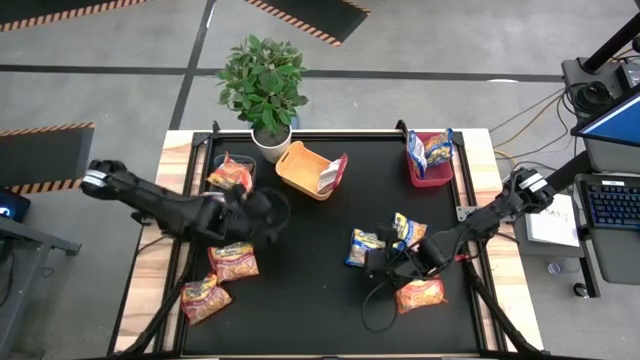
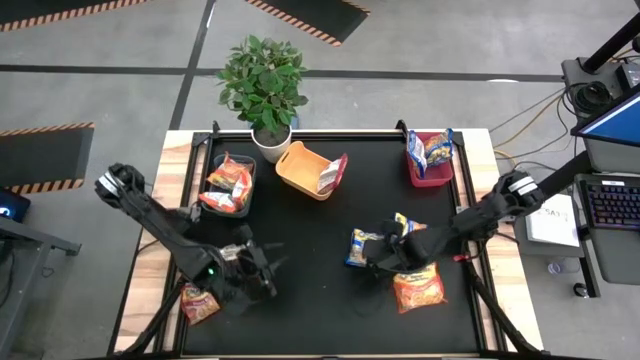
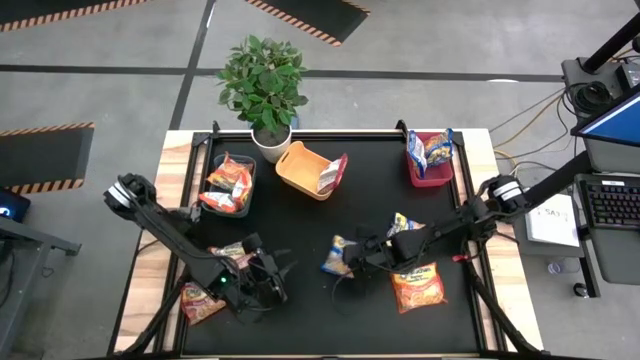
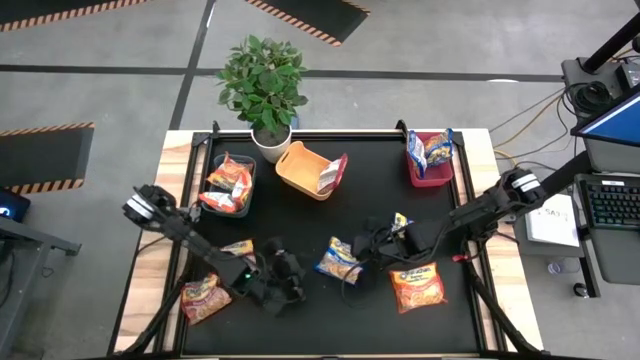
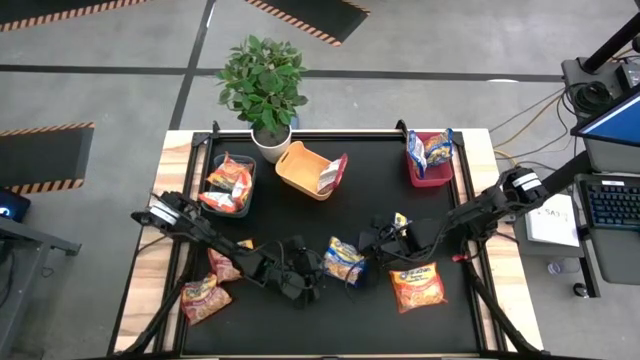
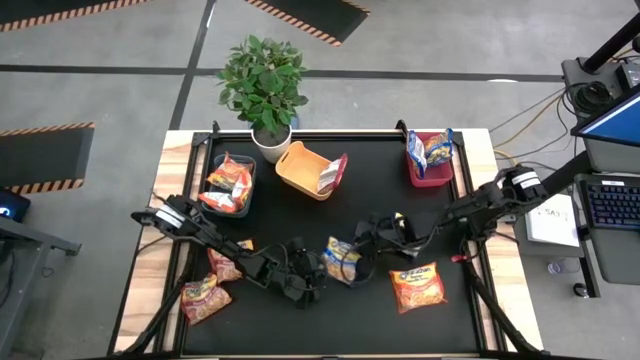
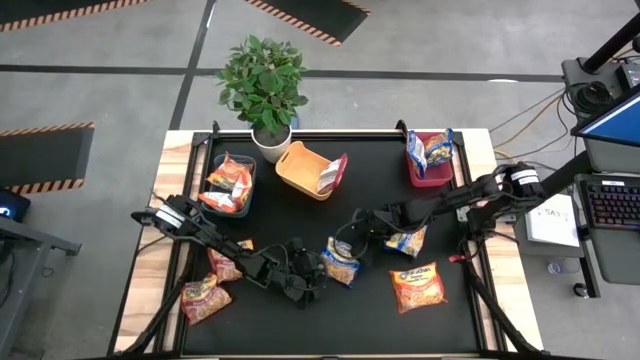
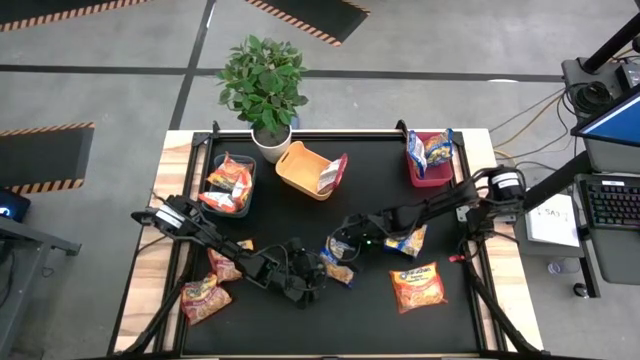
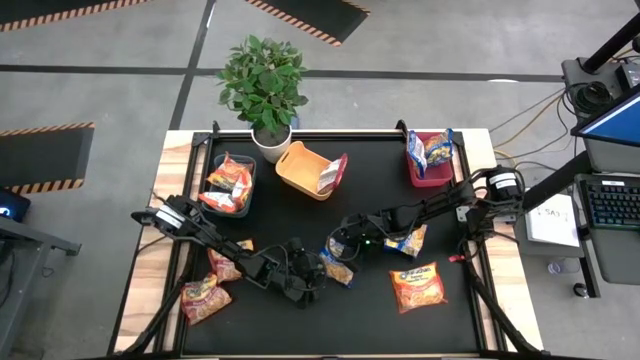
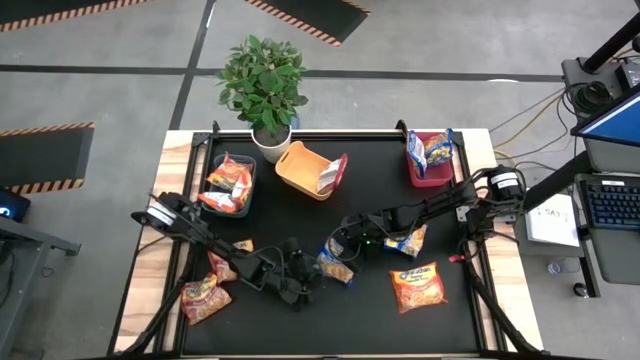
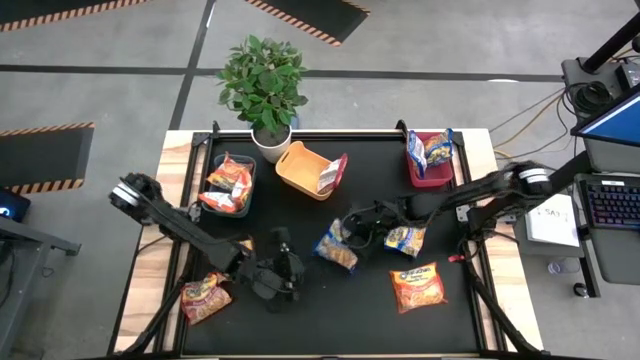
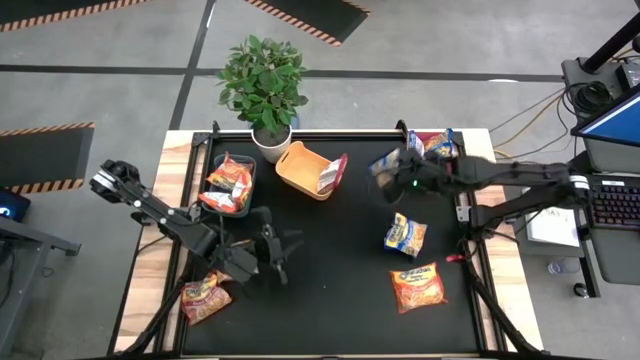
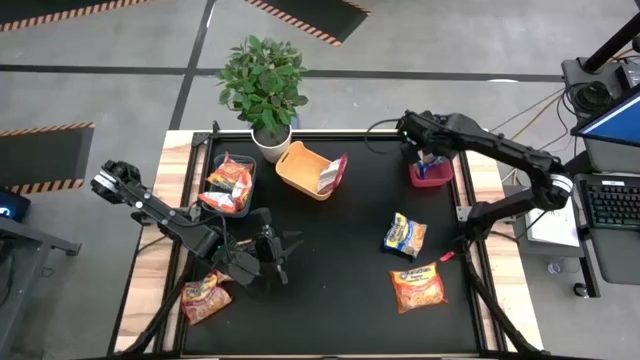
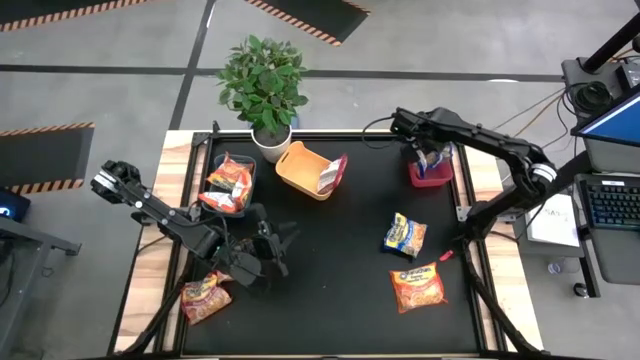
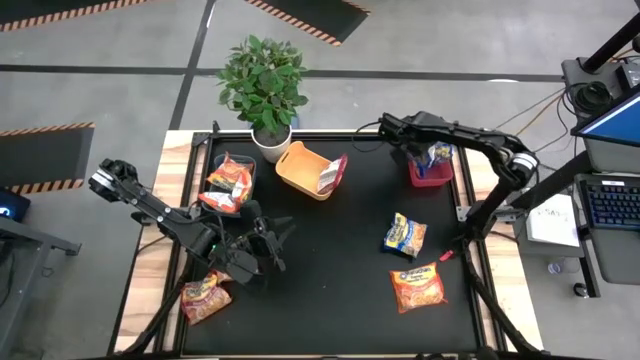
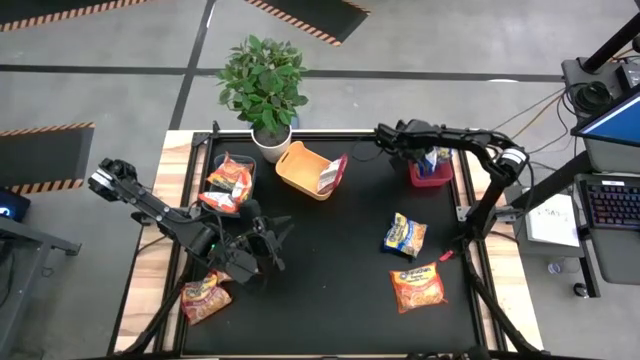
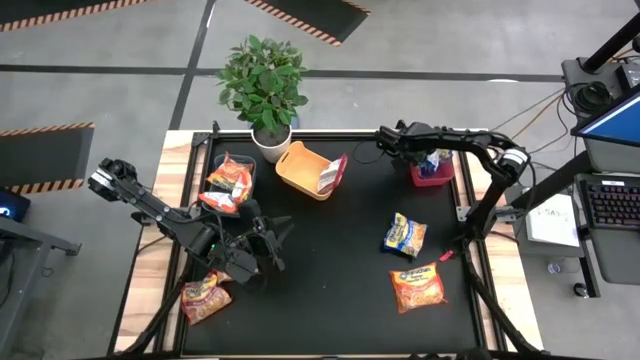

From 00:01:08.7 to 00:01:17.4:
Task: Sort Maruchan noodles
Put the blue noodle pack into the red bin

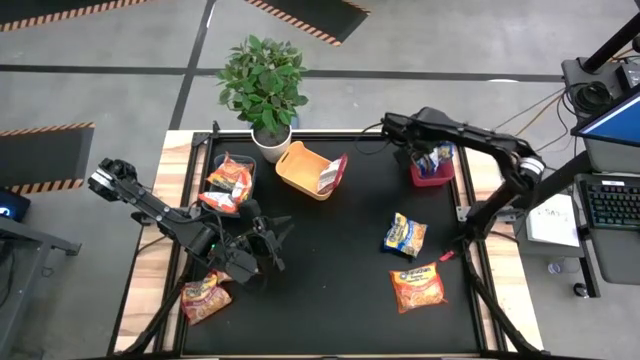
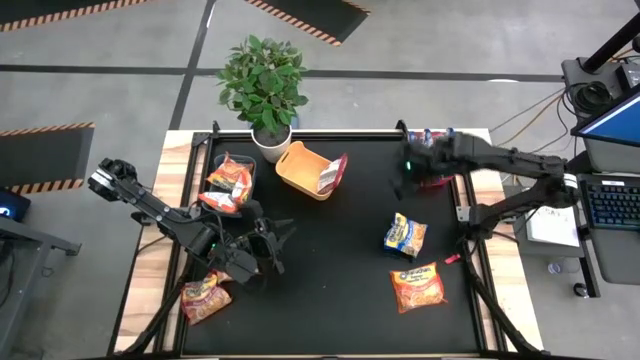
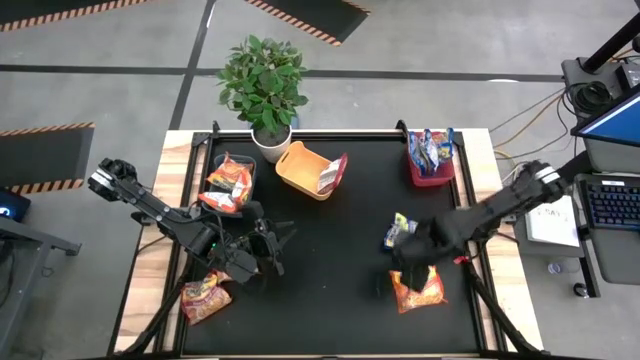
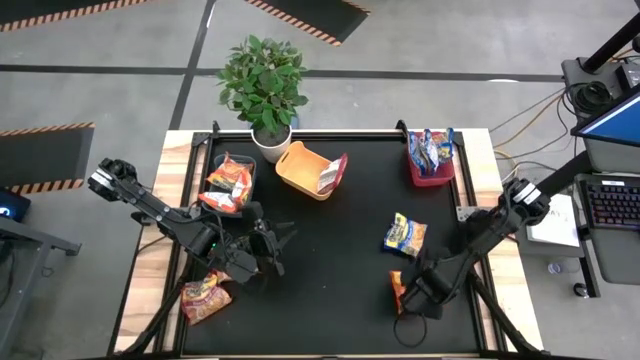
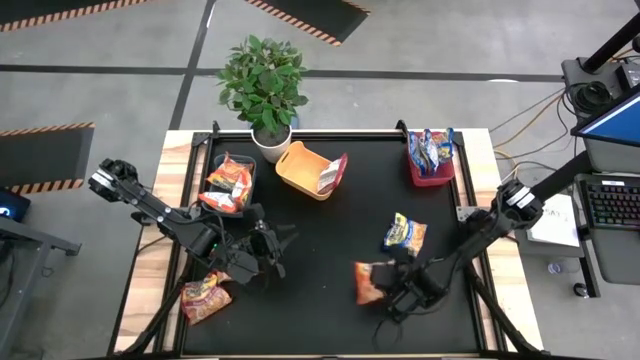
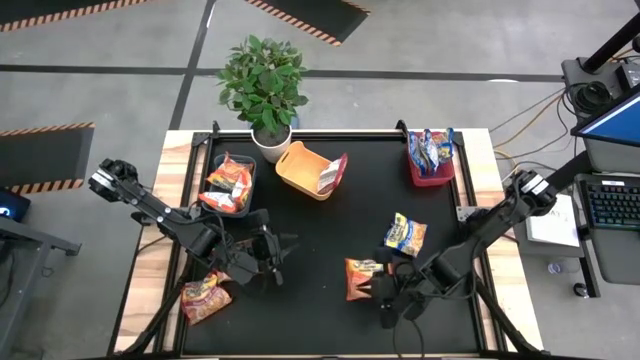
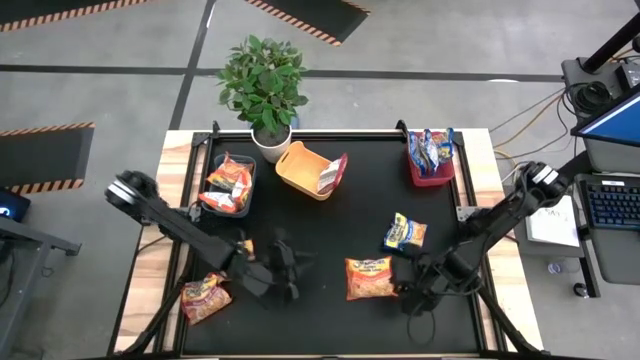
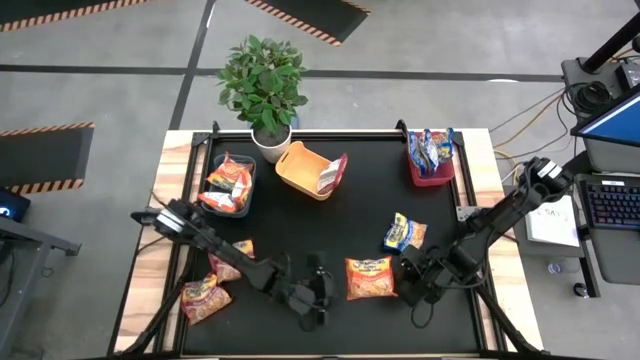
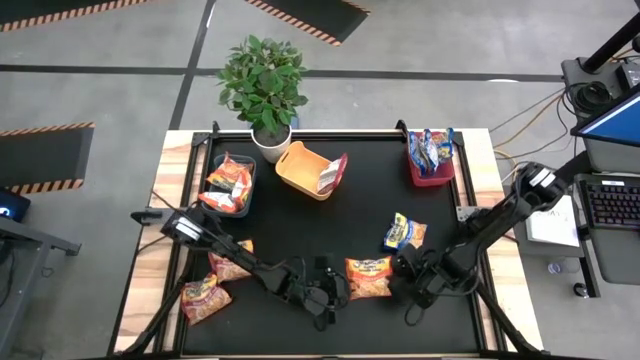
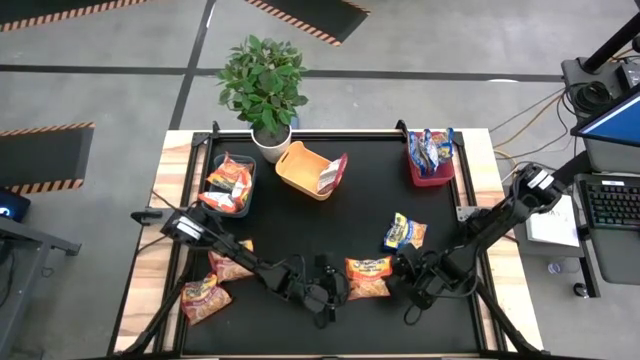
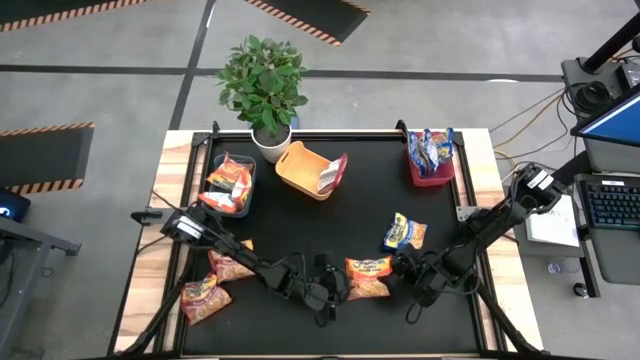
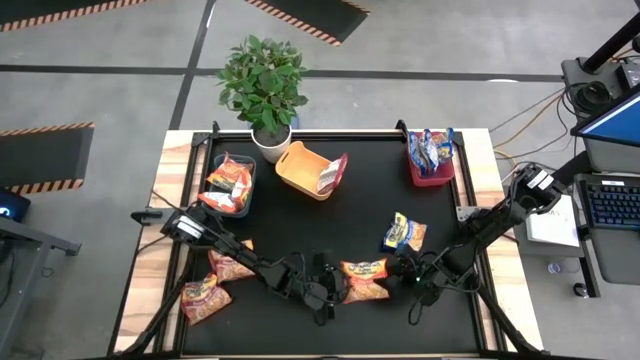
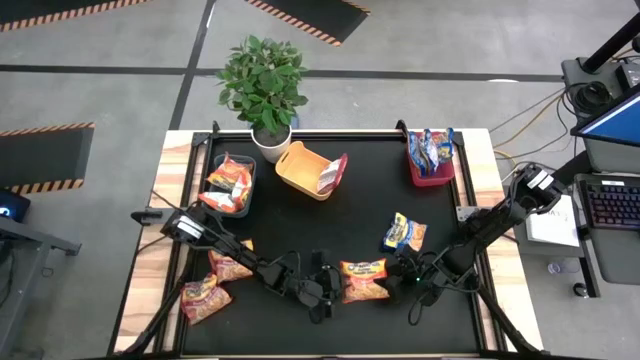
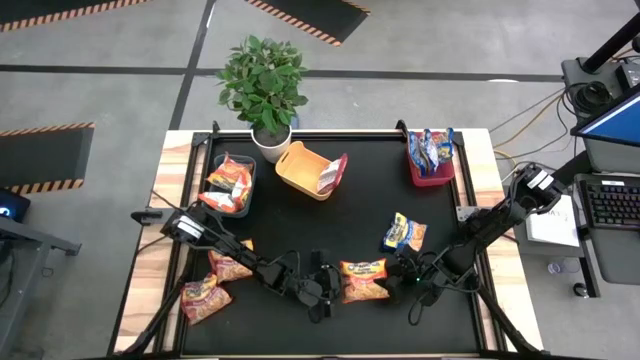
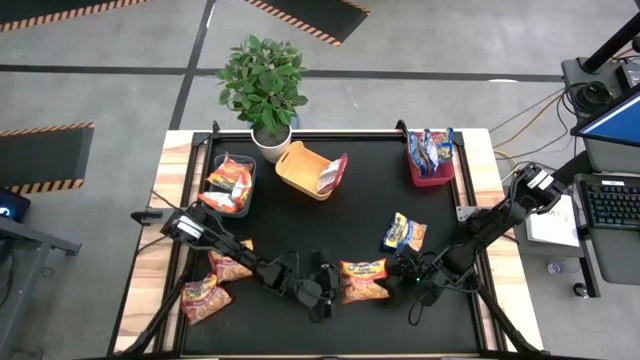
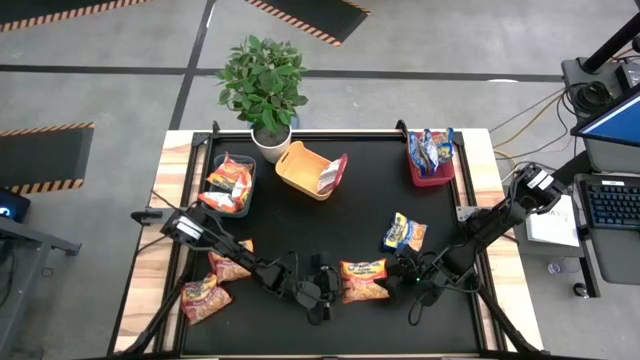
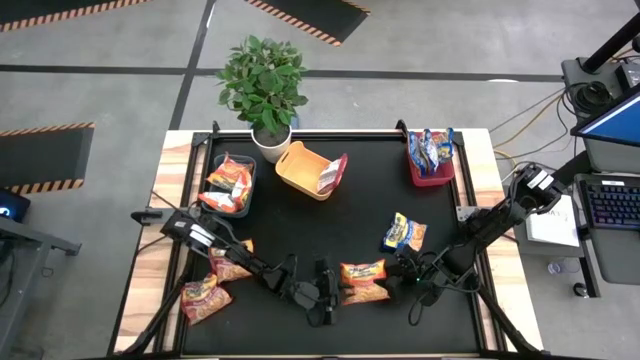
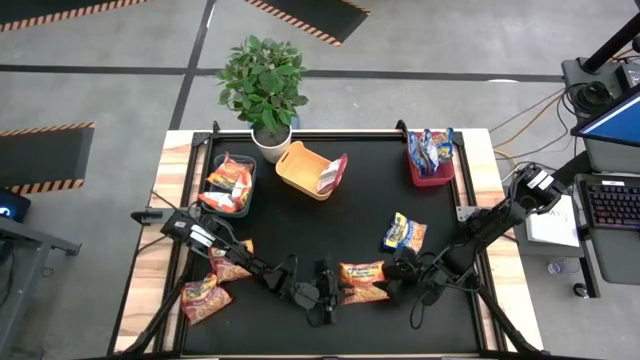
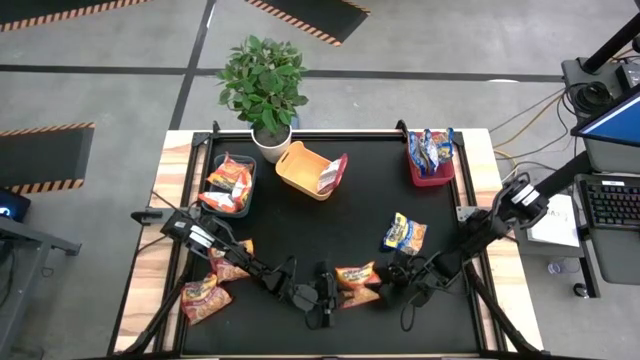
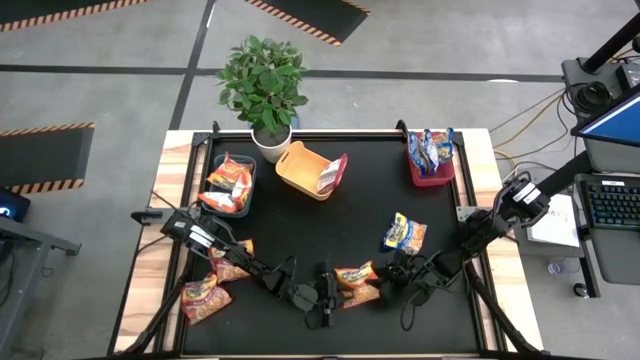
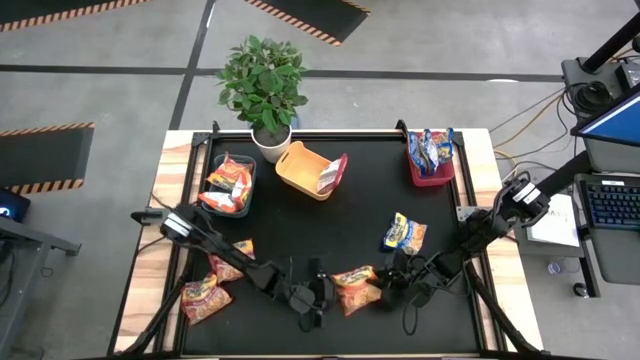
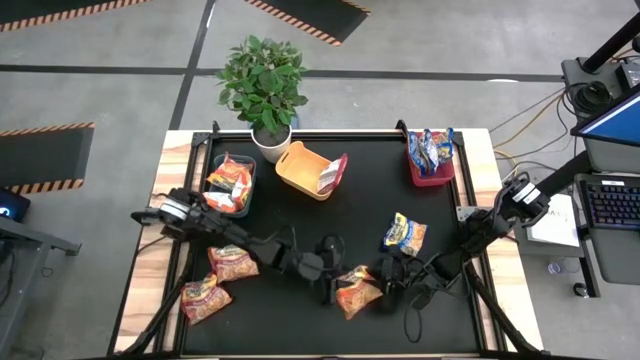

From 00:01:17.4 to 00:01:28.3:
Put the orange noodle pack into the blue bin

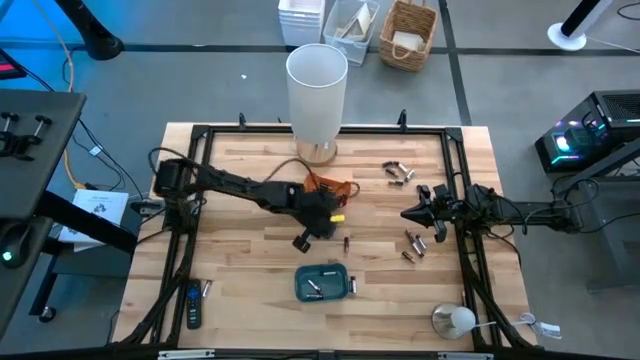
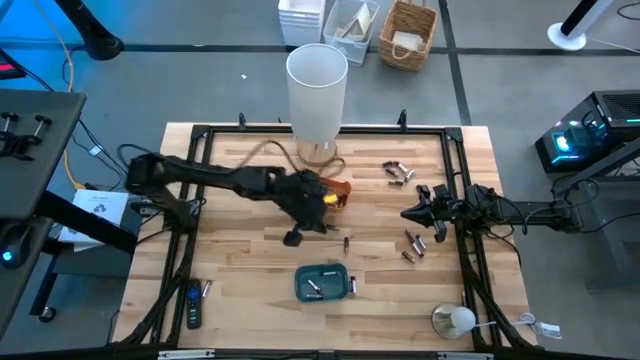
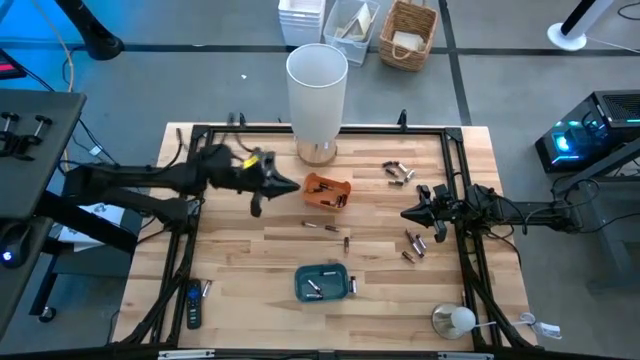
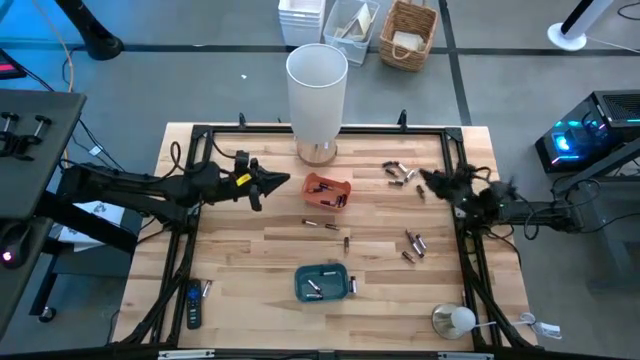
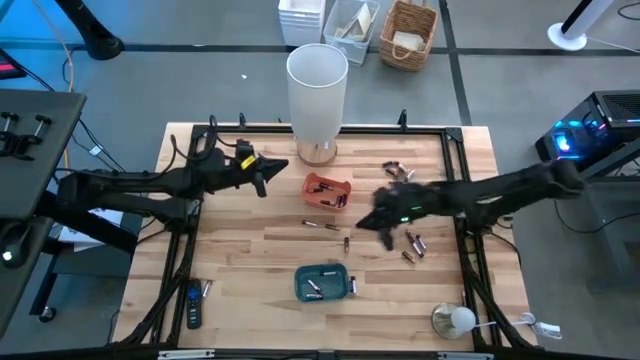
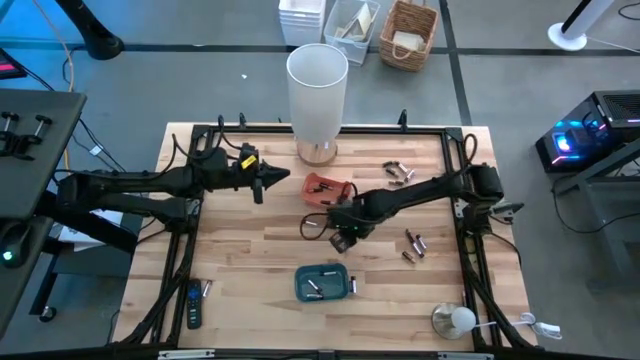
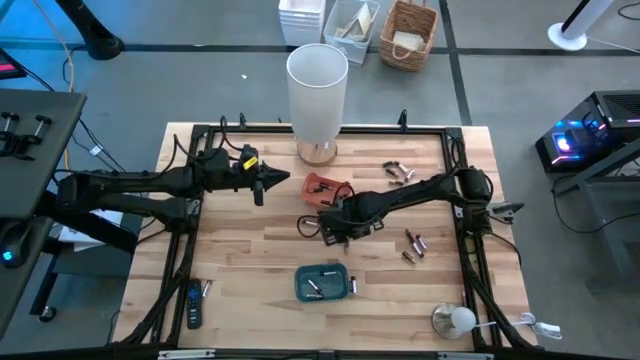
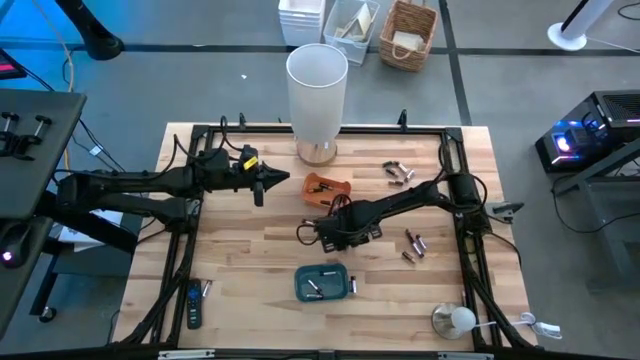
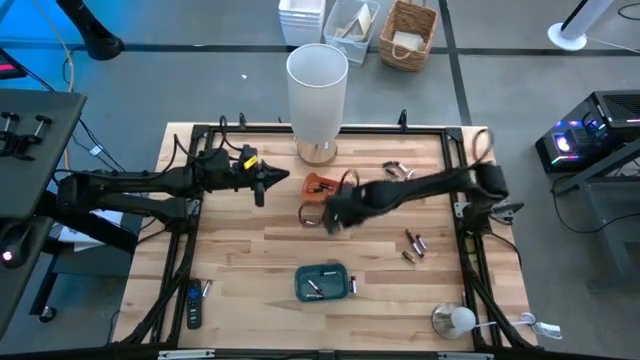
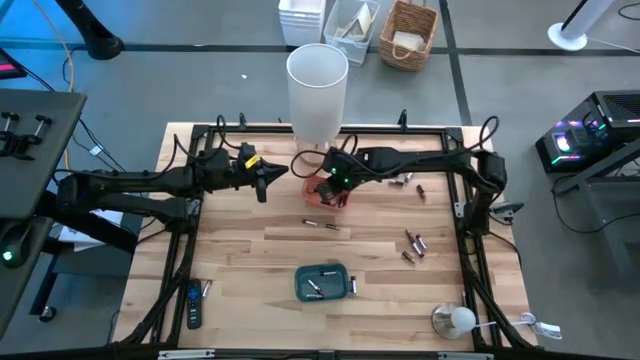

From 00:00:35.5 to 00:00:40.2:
Task: Sort batteries
Put the black battery into the orange bin
